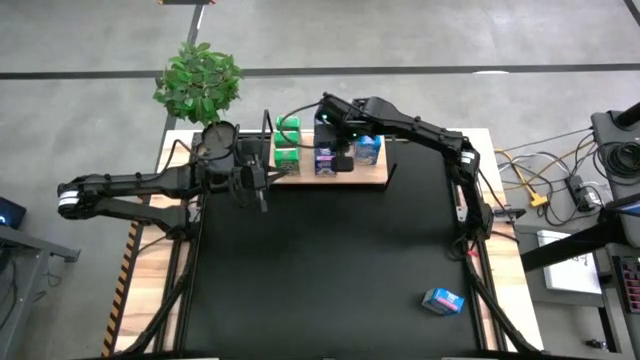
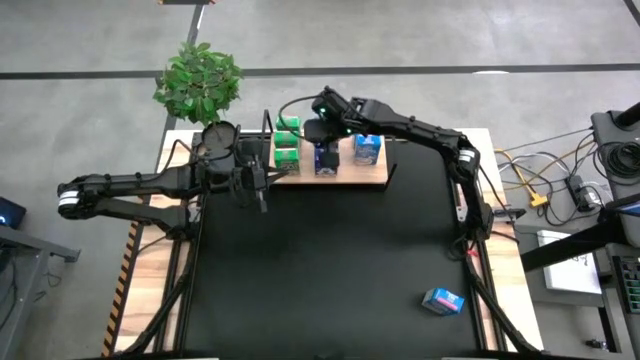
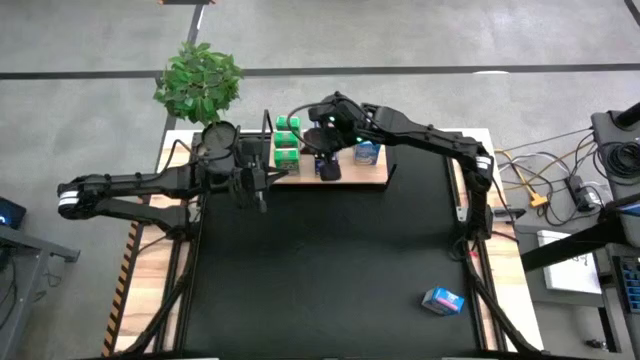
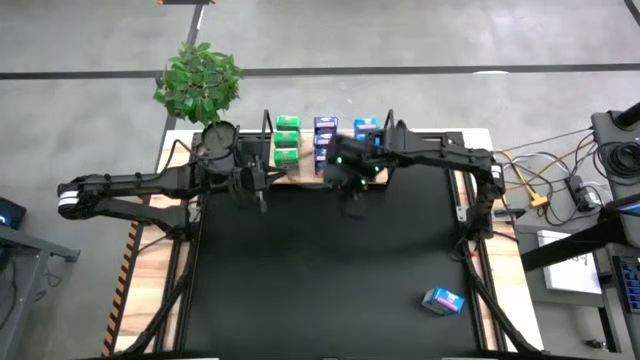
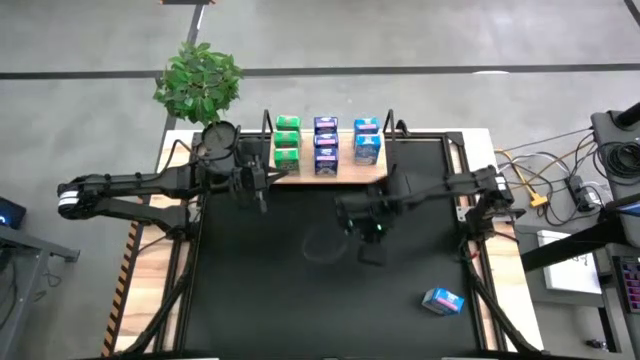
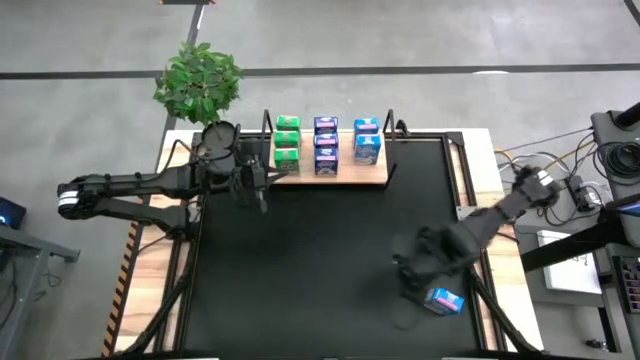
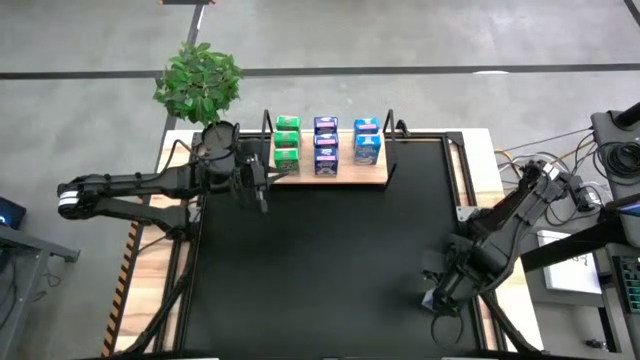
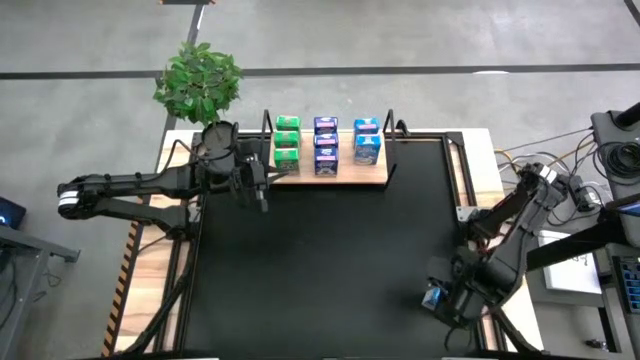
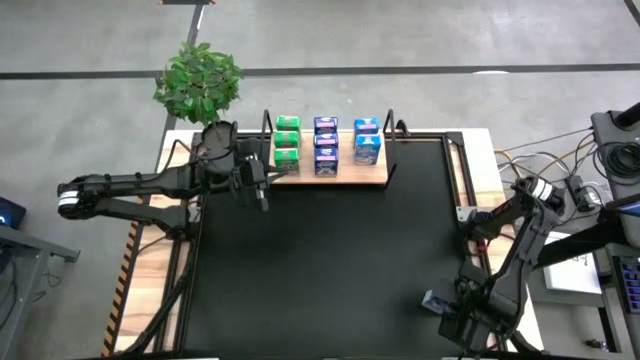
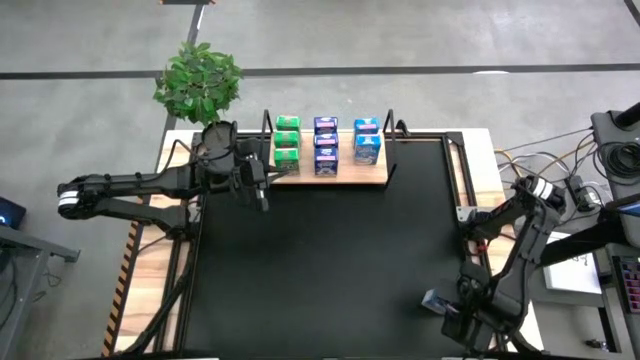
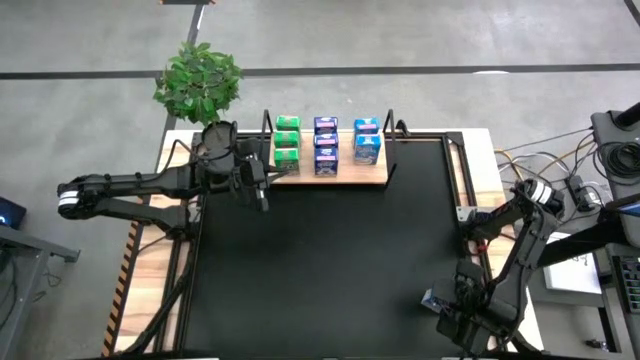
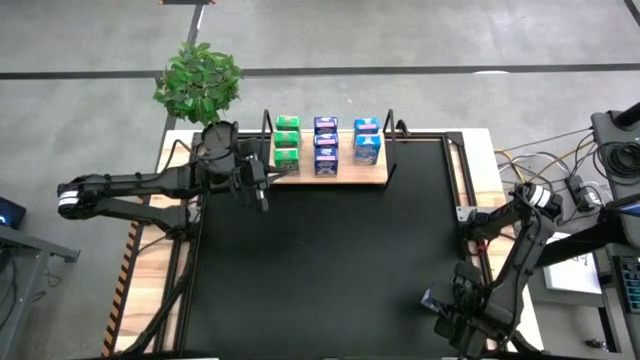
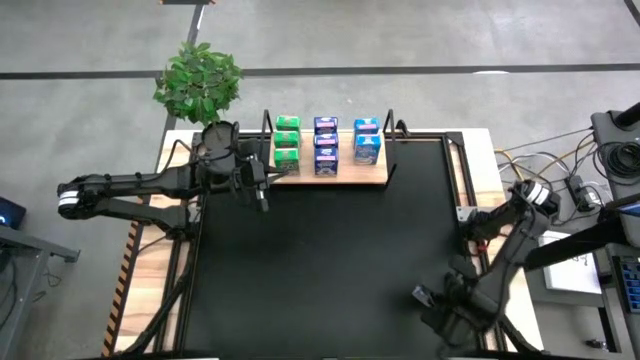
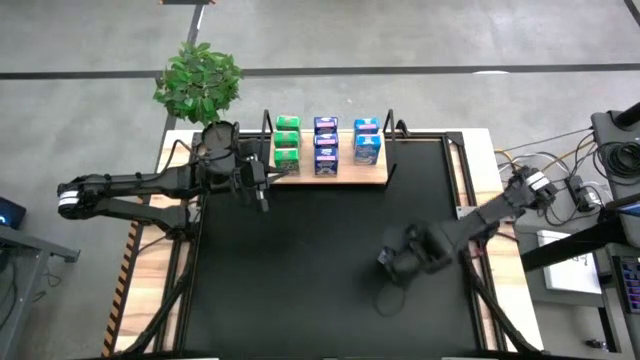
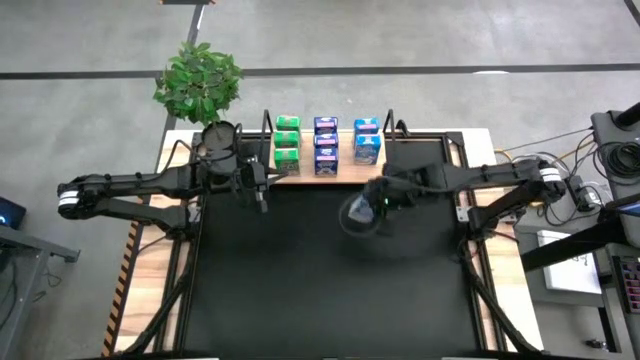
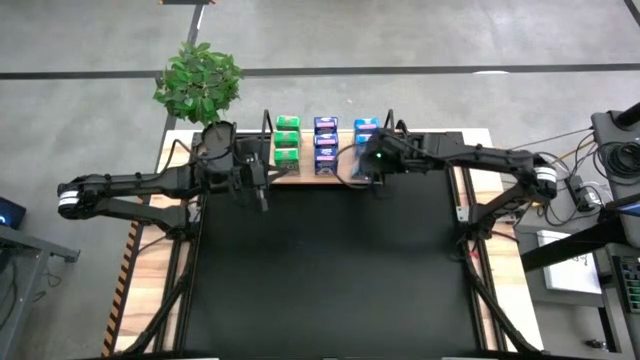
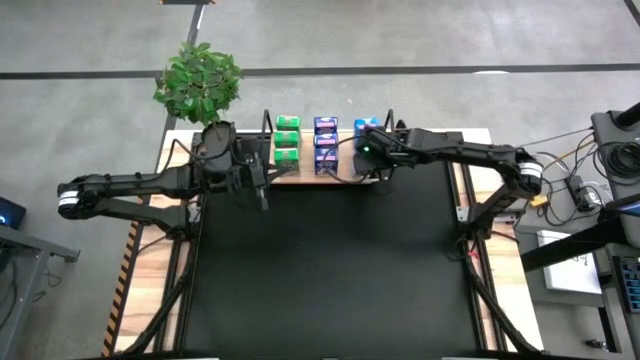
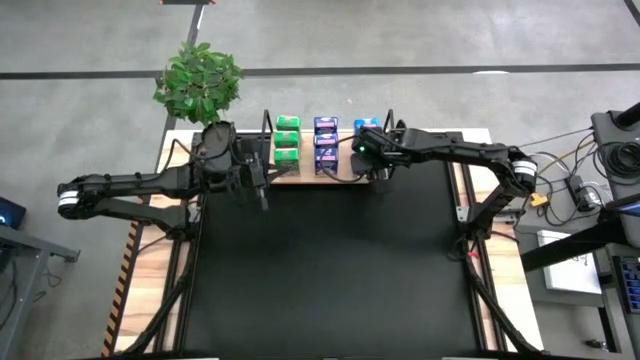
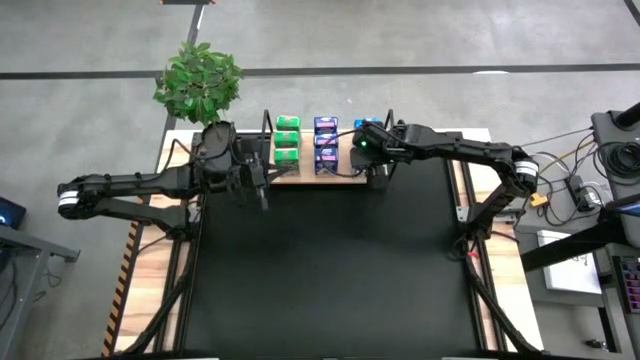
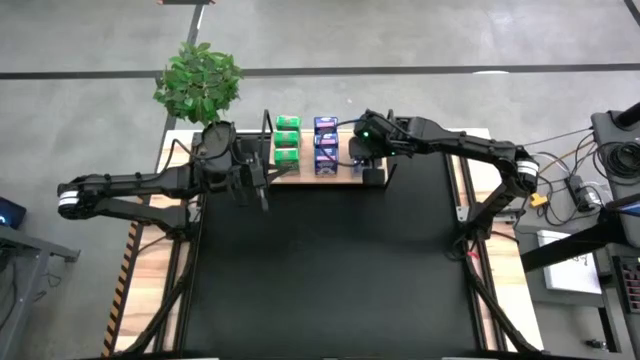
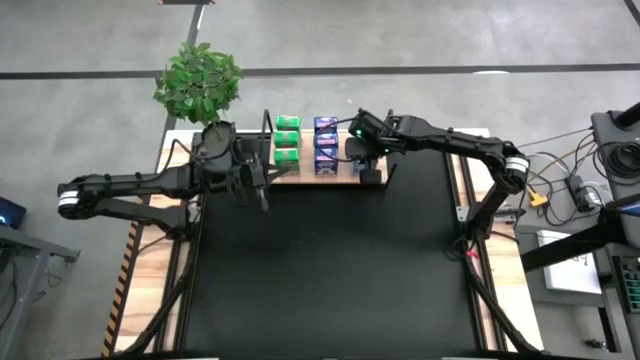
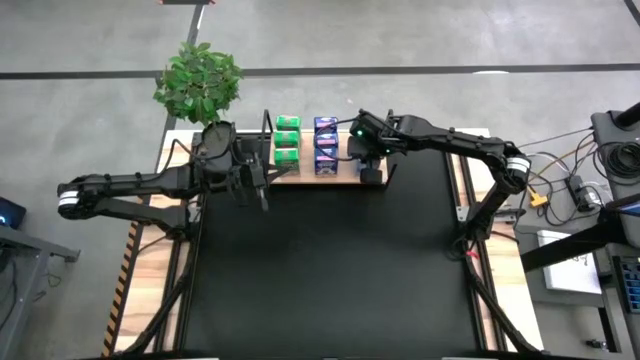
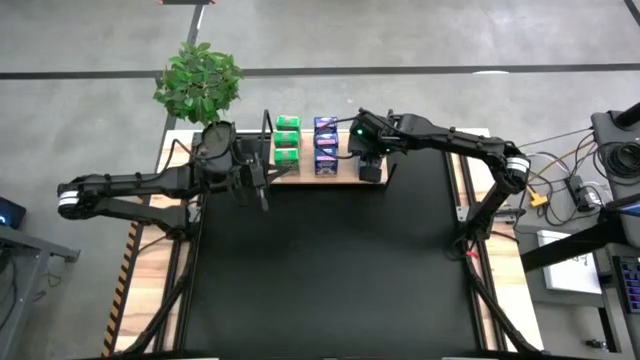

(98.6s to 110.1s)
Task: Stack cereal on shelf
Put the light blue cereal box aligned with the other light blue boxes on the shelf

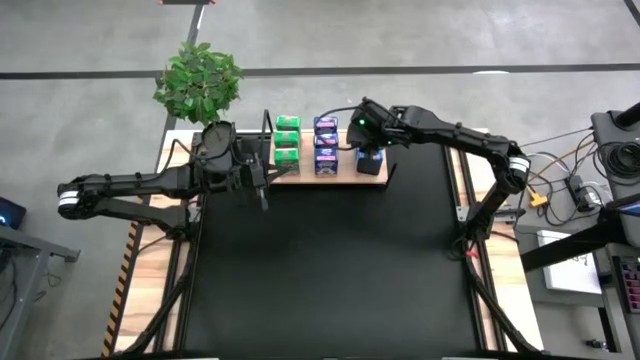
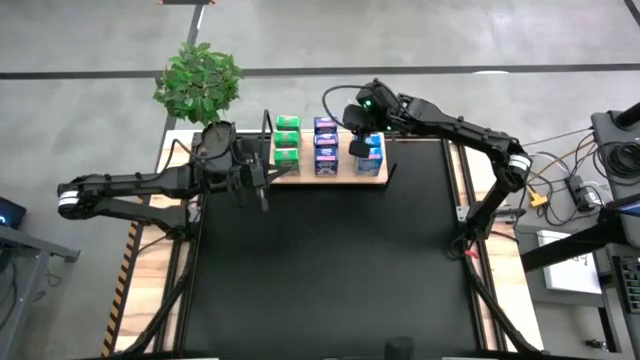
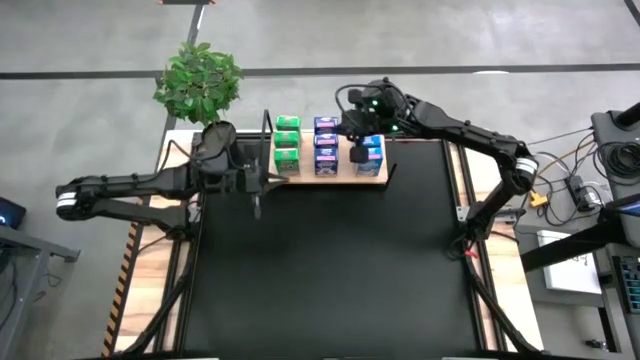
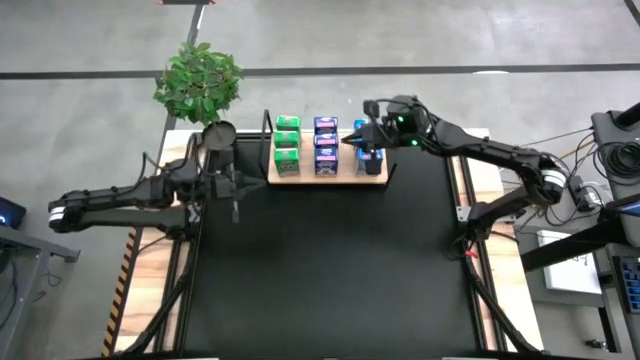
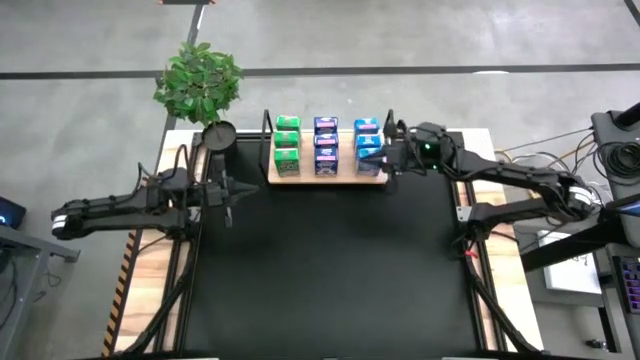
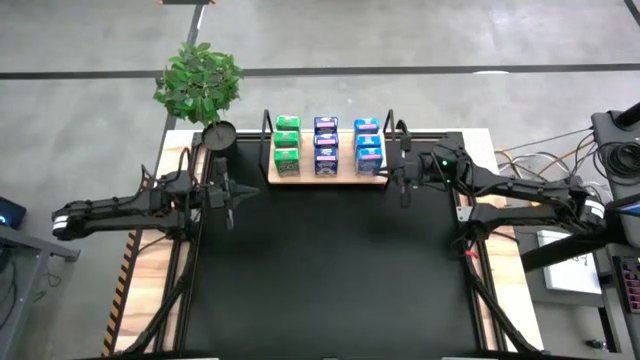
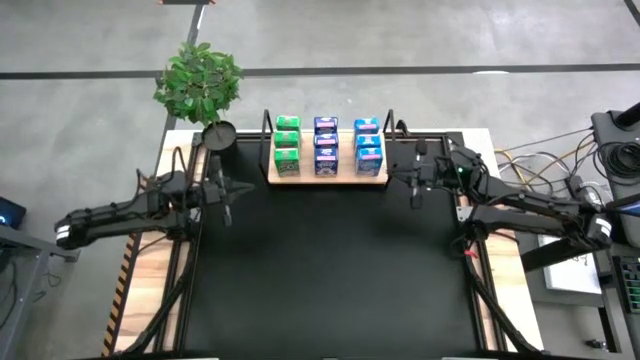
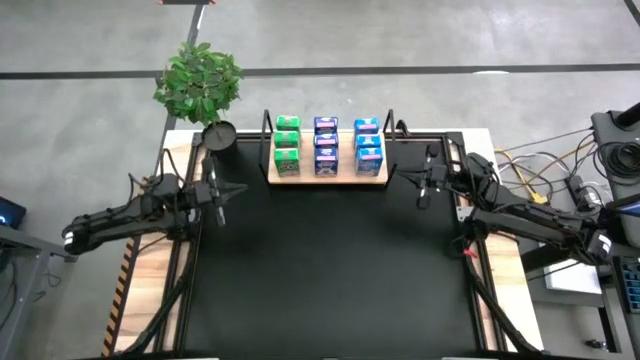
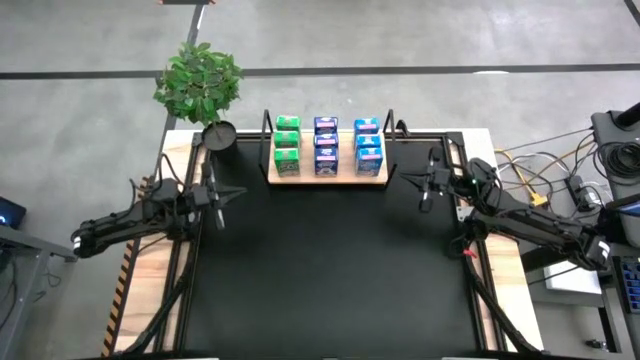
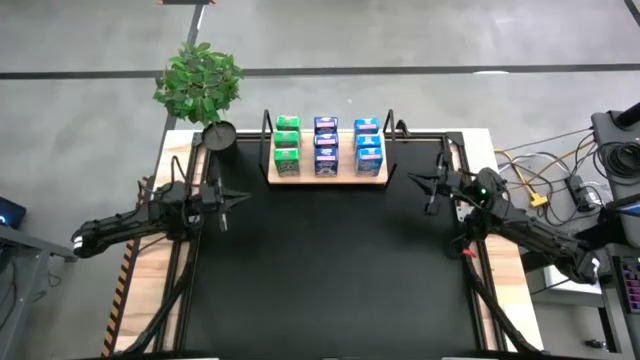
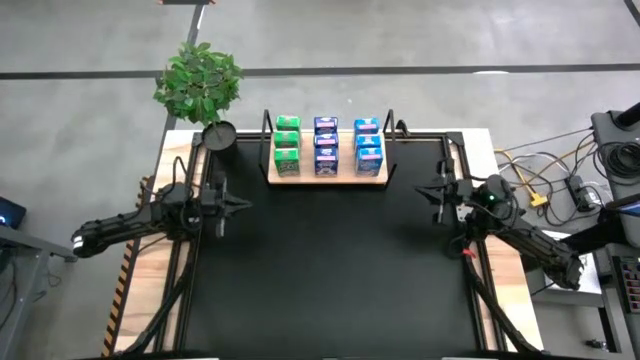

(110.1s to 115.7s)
Return to Home Position

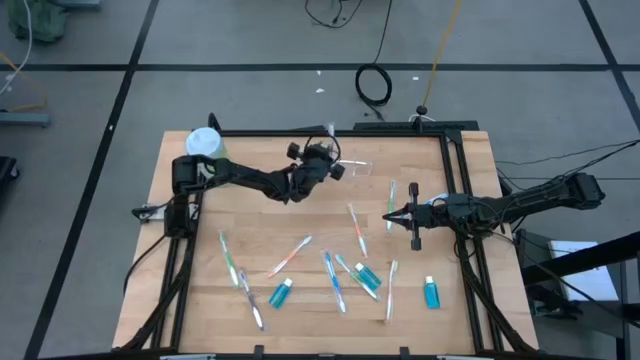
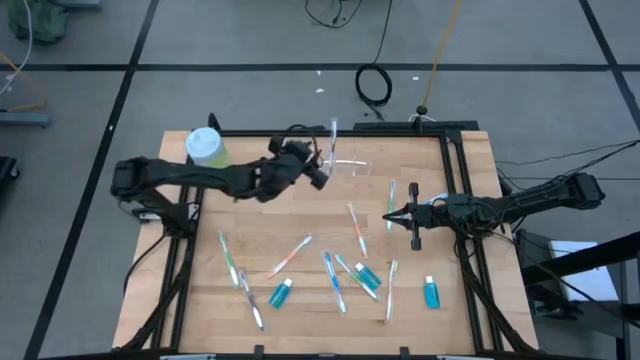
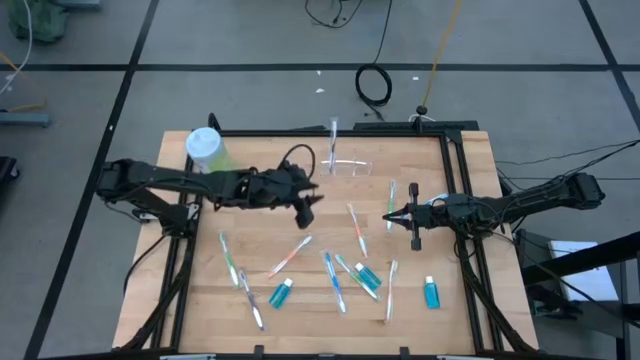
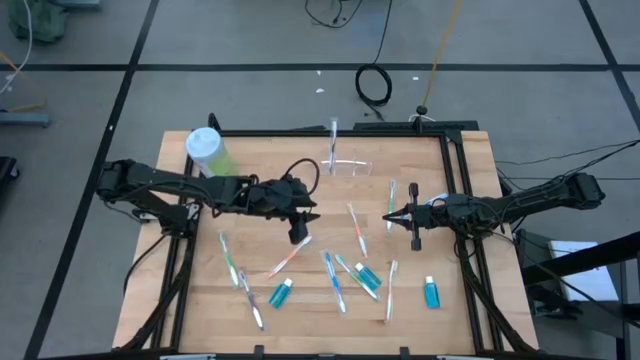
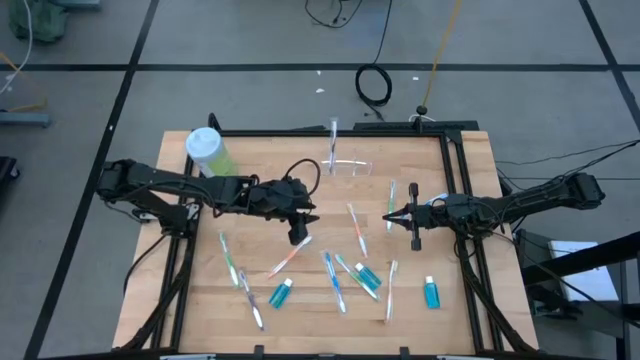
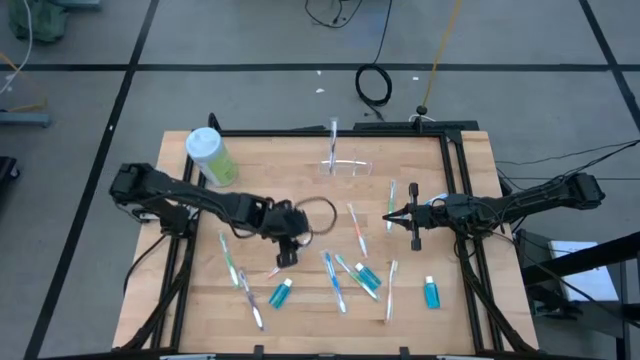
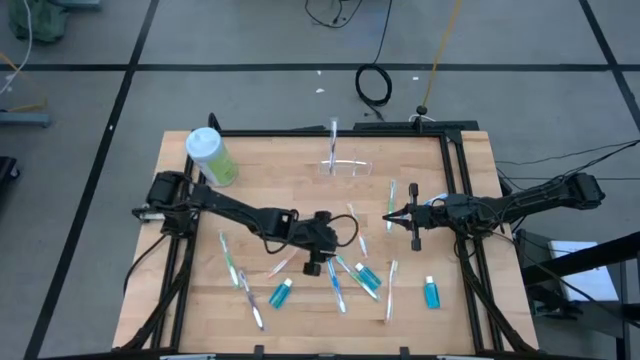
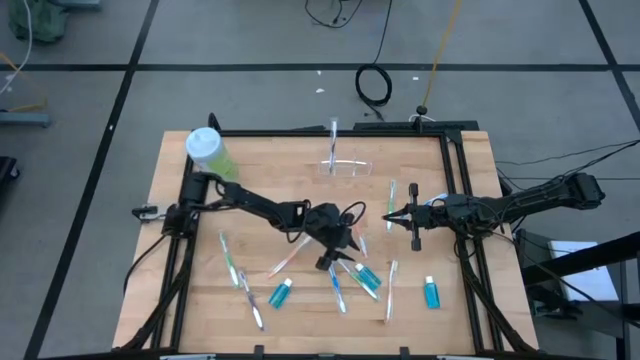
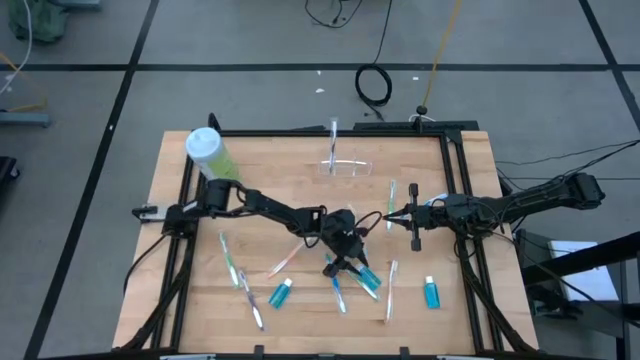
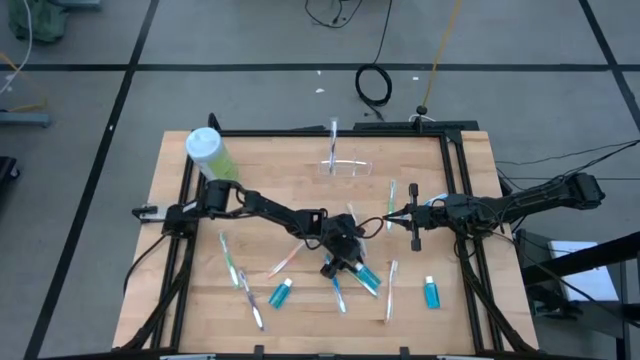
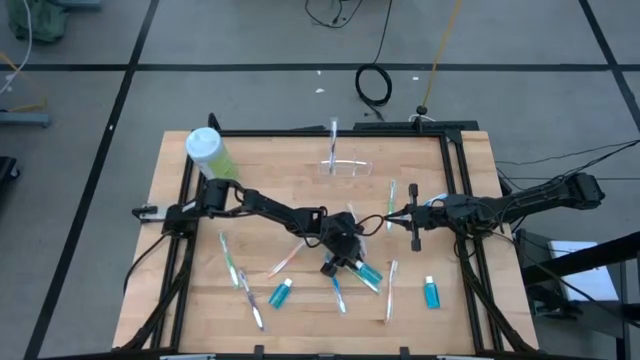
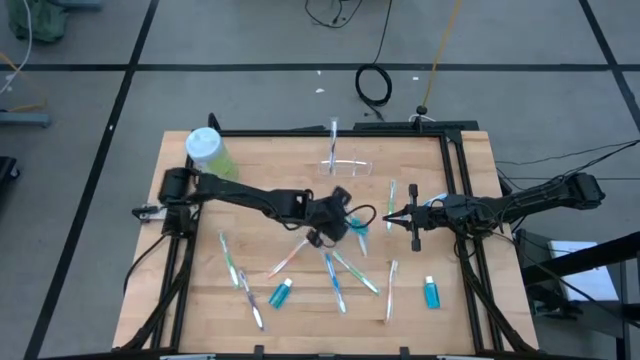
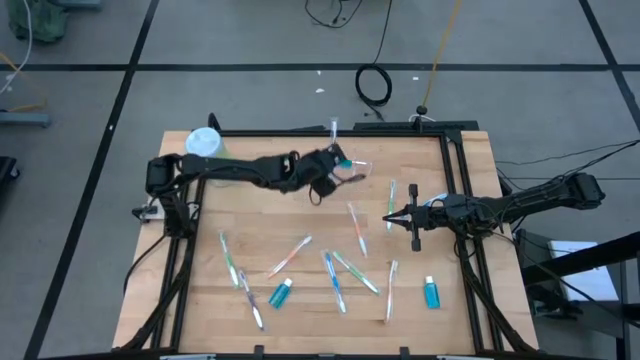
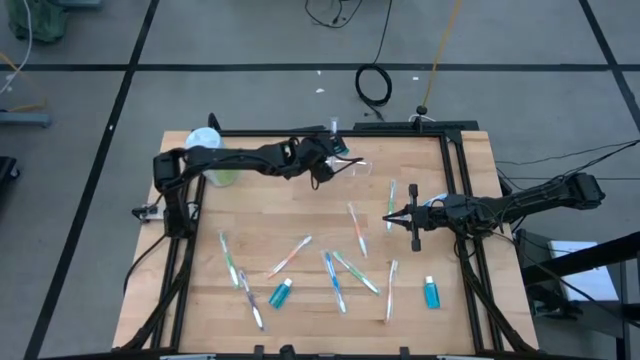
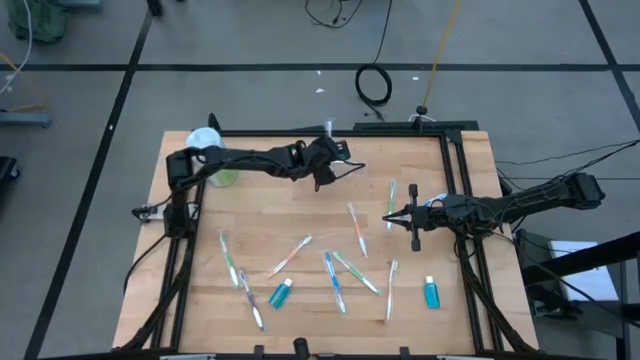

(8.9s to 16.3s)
Task: Pick & Place toothbrushing station
Put the middle blue mouthwash into the transparent organizer
